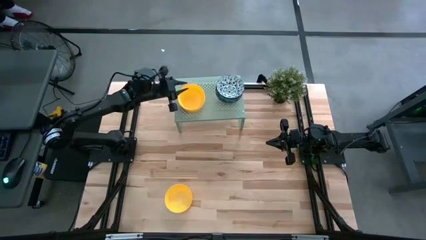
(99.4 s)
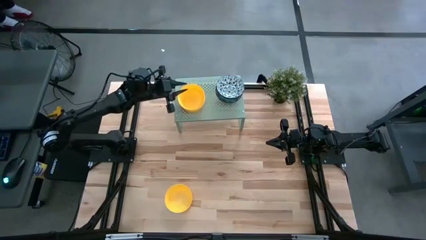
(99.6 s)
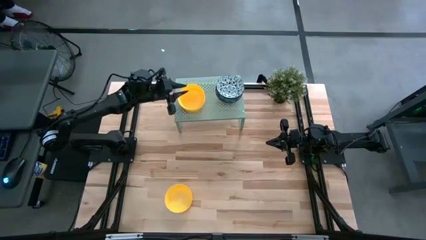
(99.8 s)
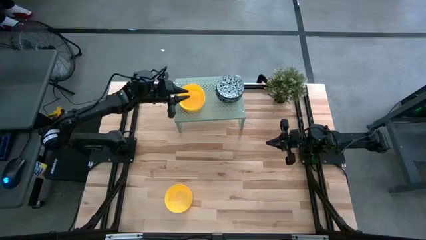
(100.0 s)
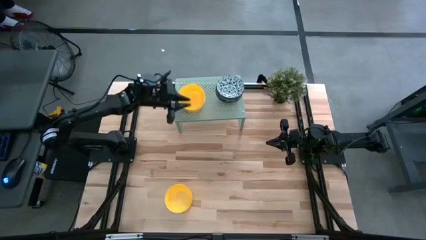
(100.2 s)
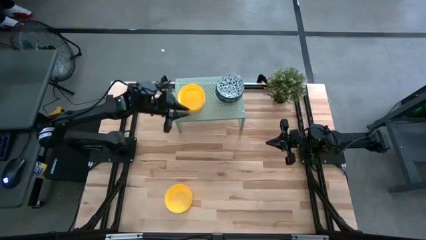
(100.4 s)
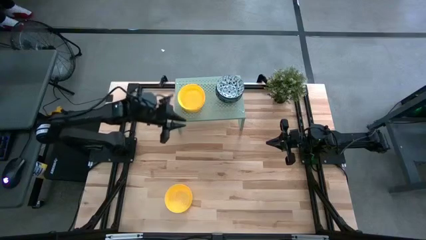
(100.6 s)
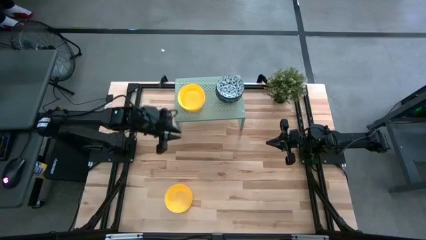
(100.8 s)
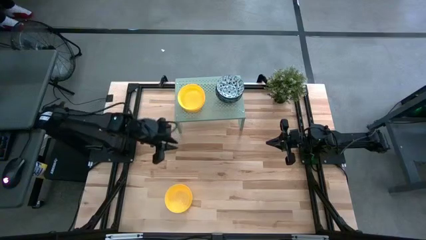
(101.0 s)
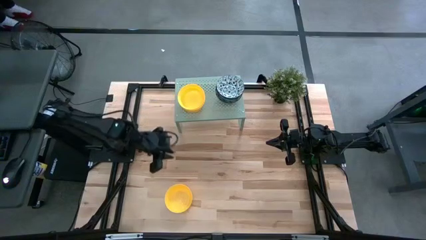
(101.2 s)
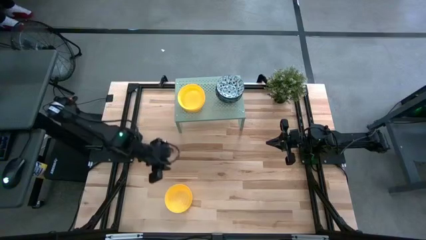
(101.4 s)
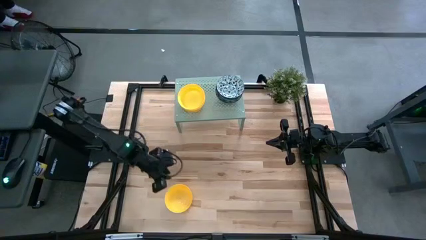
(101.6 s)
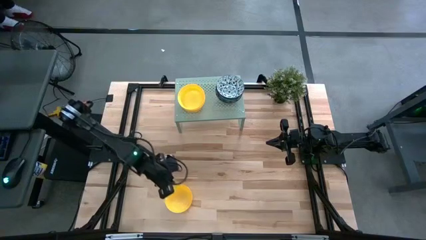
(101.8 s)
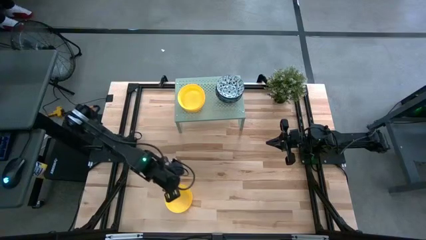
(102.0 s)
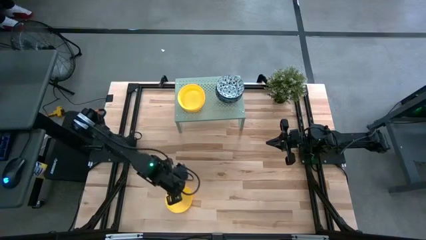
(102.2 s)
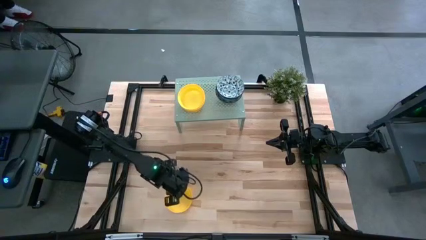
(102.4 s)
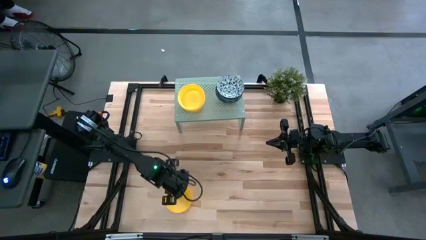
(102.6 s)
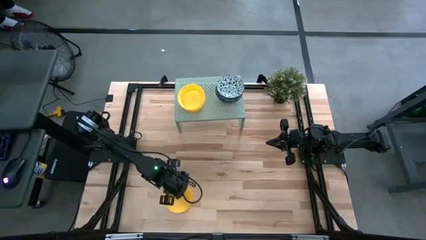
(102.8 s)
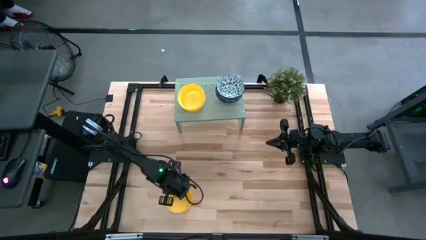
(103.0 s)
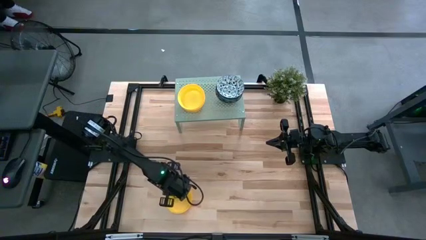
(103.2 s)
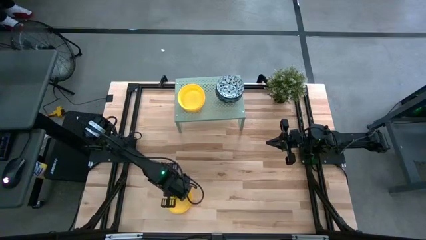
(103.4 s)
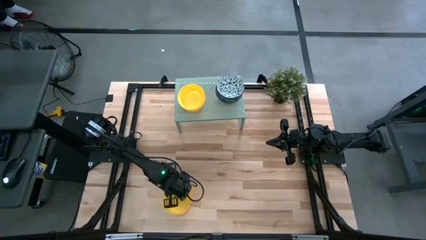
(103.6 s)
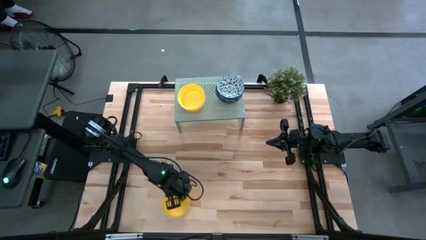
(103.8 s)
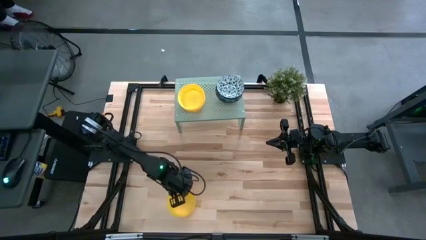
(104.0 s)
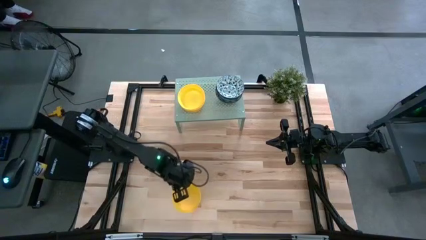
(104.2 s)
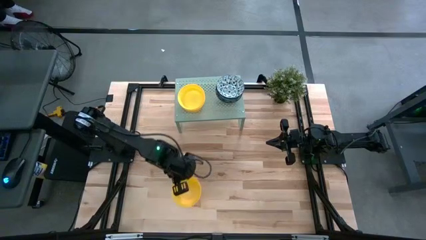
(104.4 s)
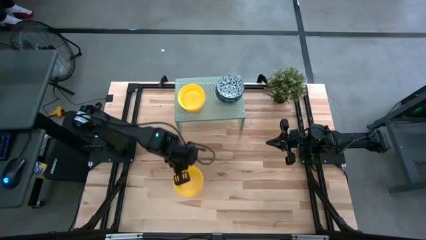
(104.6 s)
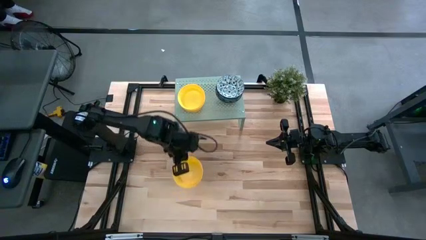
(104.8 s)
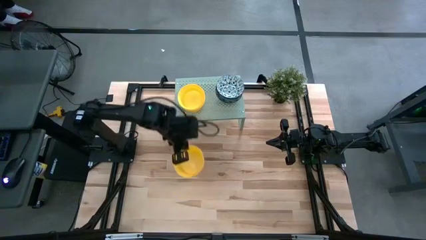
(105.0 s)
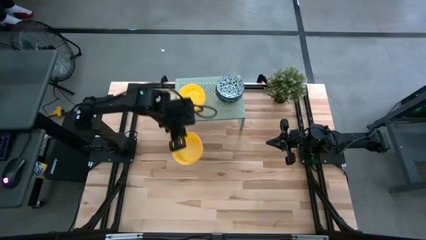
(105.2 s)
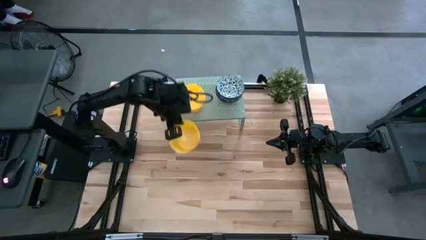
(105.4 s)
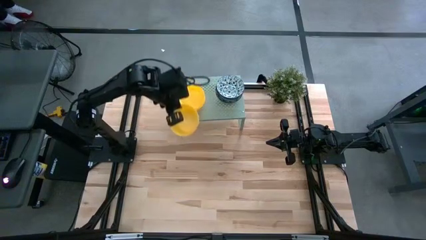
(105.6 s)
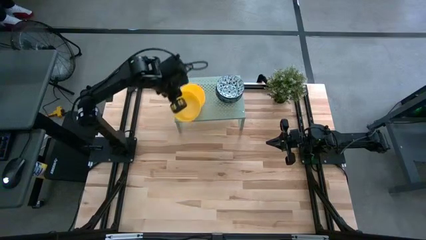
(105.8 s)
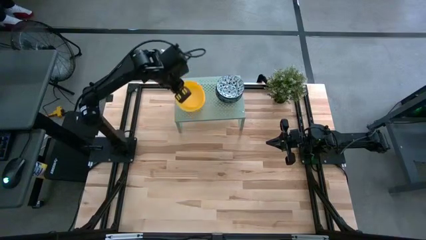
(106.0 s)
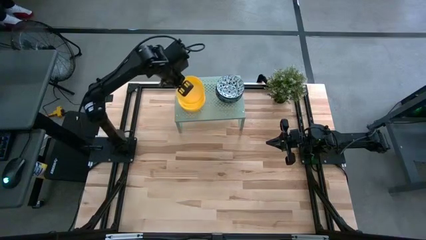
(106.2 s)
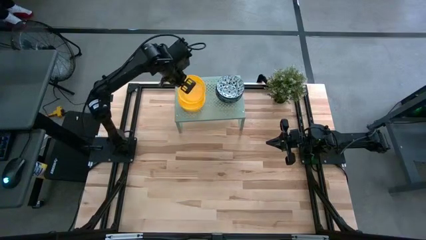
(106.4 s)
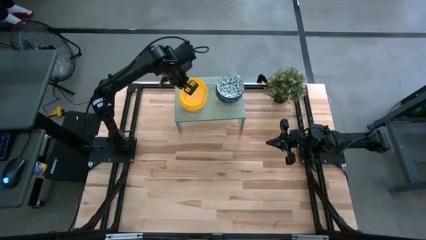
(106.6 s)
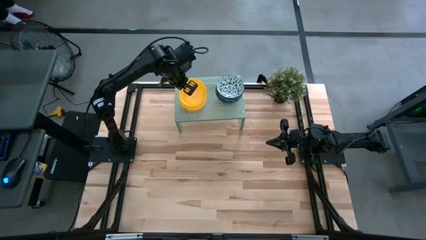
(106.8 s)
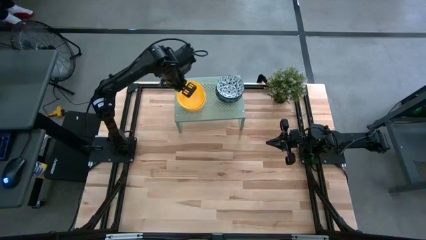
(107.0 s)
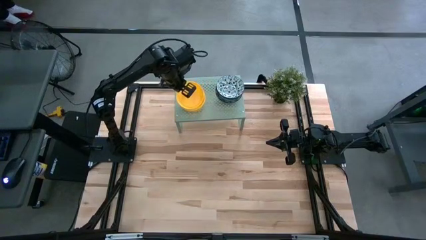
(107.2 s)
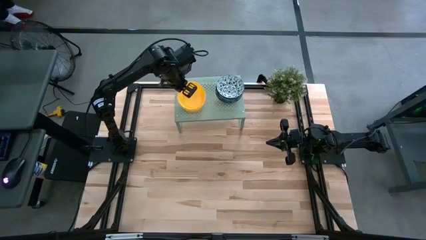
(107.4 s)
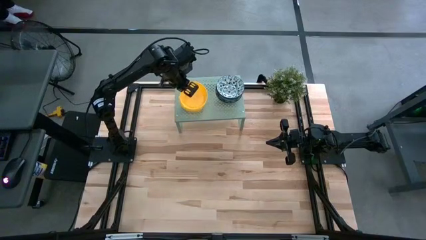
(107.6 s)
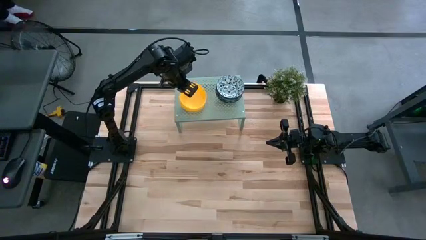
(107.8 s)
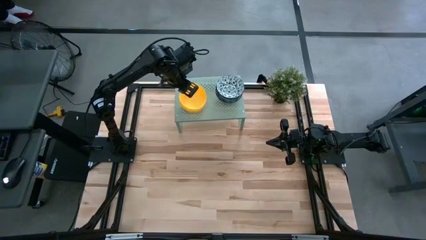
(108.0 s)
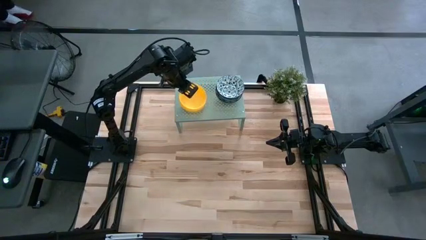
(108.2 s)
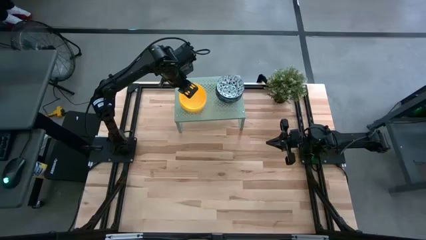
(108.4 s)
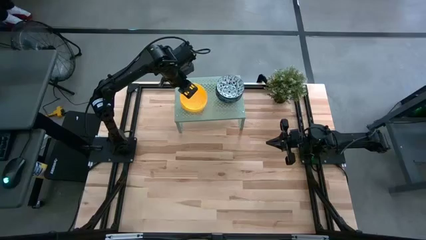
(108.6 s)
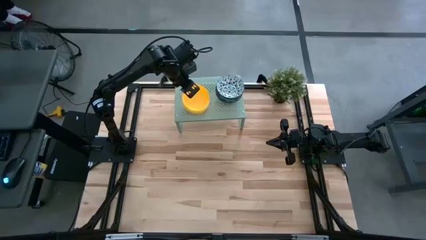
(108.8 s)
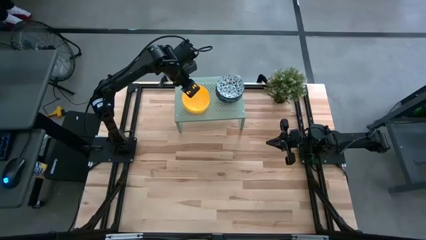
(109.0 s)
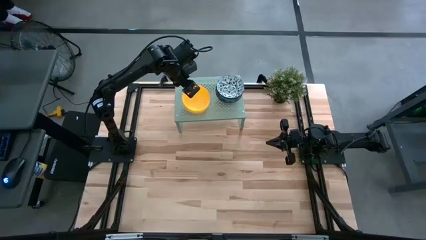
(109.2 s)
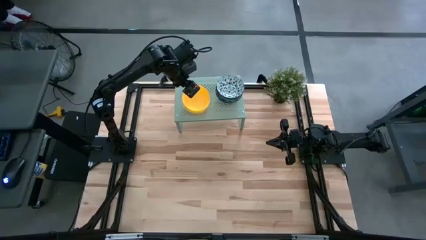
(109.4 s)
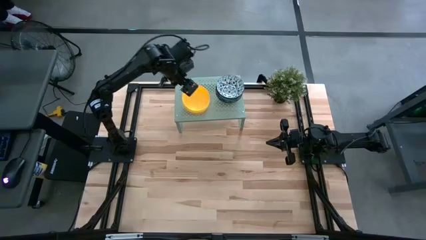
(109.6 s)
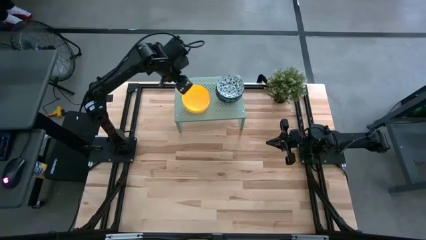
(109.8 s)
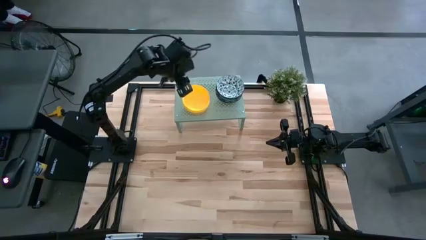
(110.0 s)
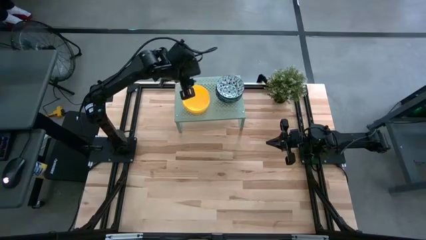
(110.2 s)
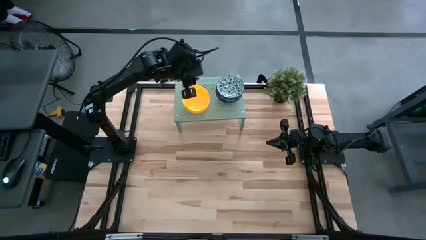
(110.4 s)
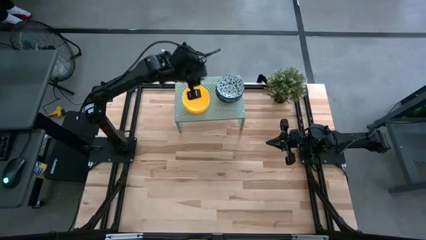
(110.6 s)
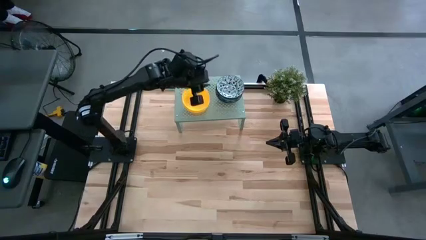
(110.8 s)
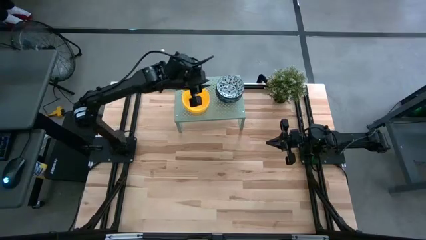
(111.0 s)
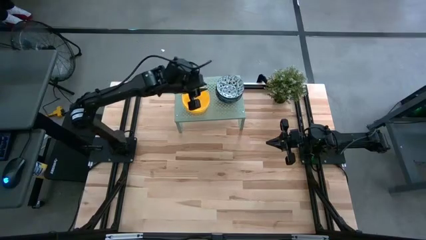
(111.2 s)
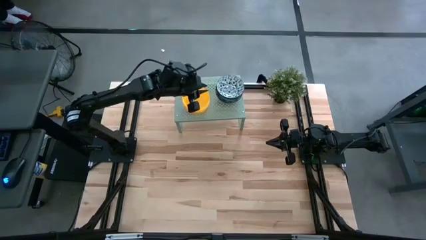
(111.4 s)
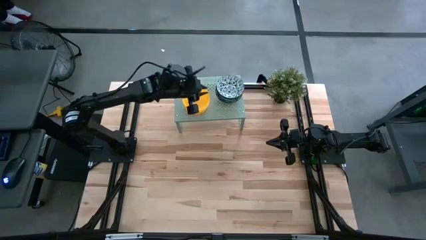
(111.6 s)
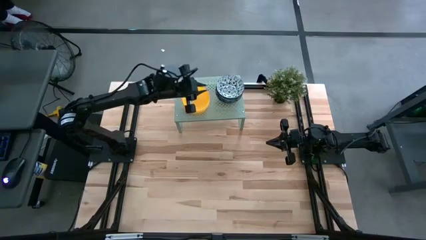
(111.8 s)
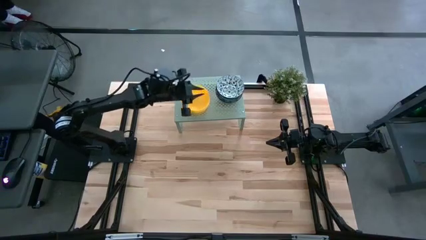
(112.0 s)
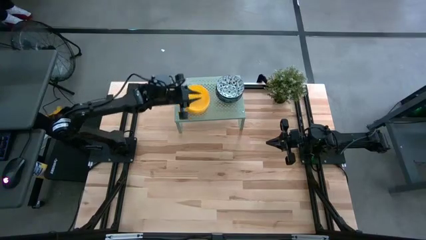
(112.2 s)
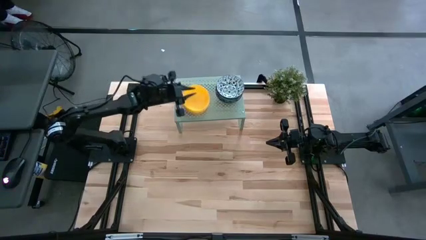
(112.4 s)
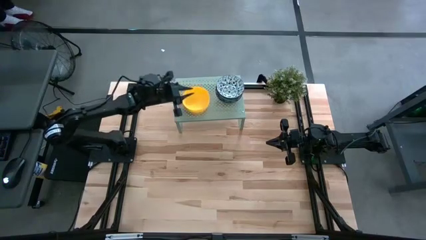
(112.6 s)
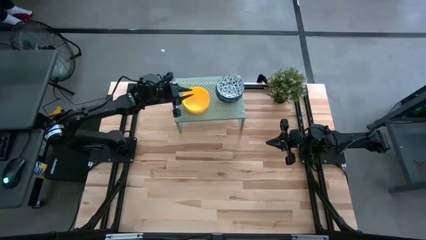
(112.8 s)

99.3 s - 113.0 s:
Task: Pick & Place Mini bowls
Stack the yellow bowl on top of the other yellow bowl on the shelf

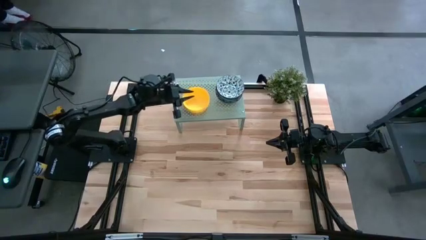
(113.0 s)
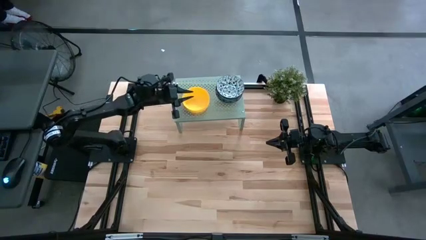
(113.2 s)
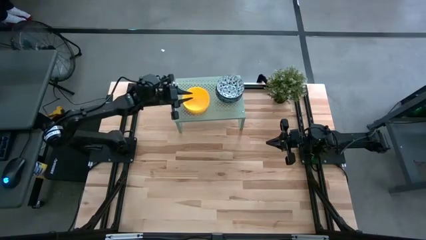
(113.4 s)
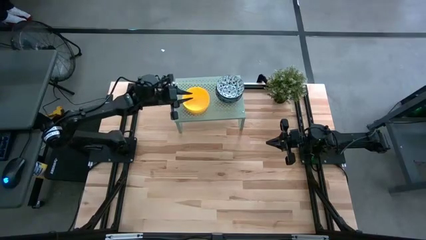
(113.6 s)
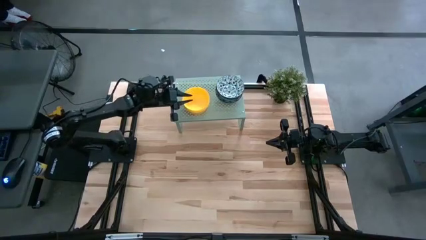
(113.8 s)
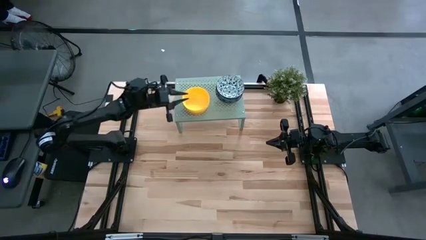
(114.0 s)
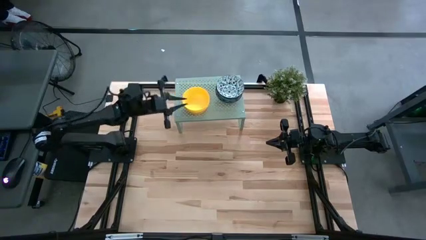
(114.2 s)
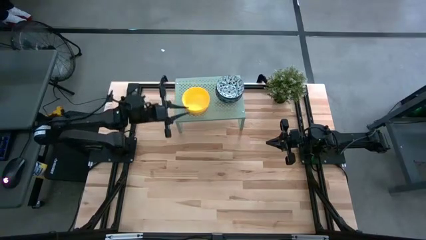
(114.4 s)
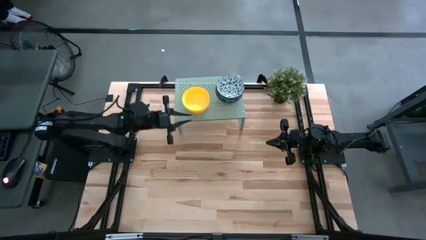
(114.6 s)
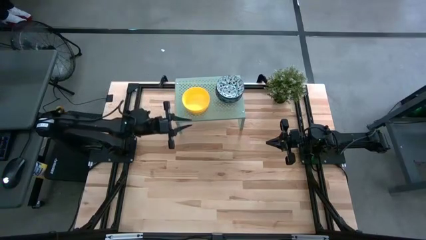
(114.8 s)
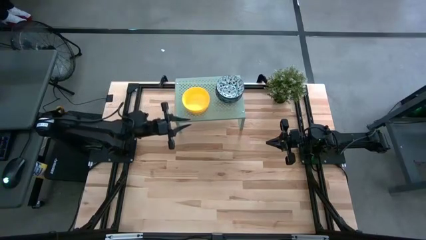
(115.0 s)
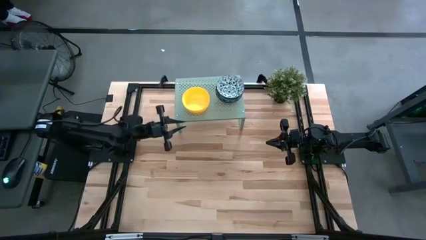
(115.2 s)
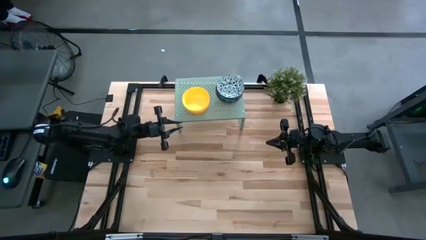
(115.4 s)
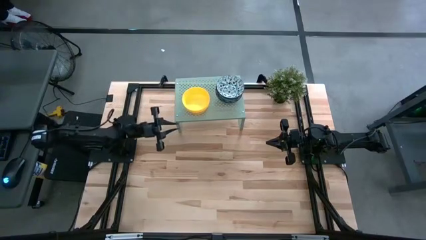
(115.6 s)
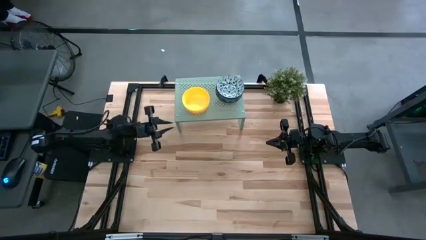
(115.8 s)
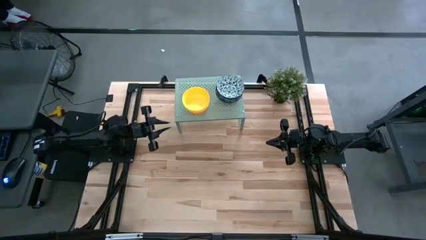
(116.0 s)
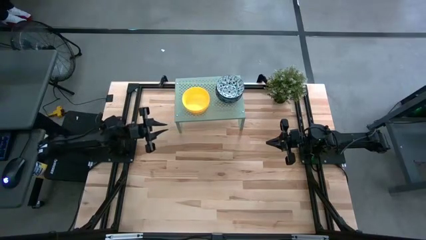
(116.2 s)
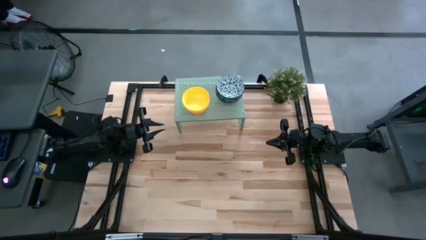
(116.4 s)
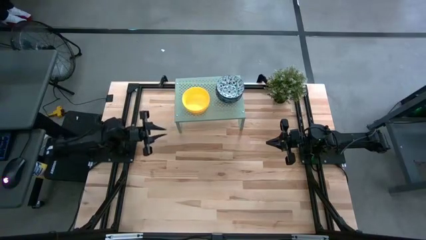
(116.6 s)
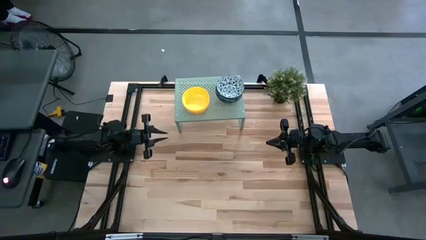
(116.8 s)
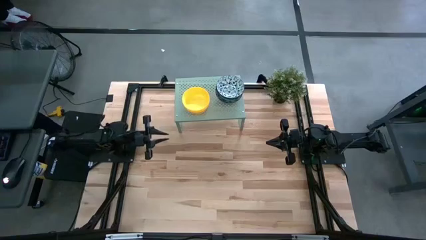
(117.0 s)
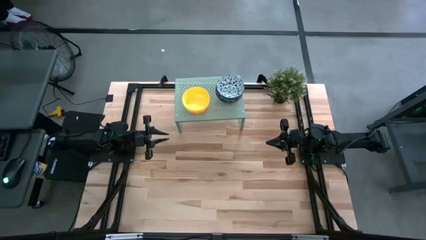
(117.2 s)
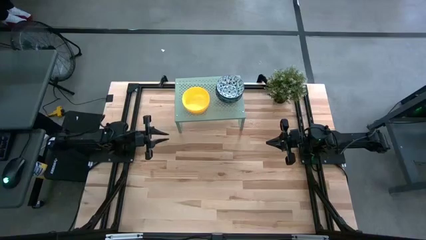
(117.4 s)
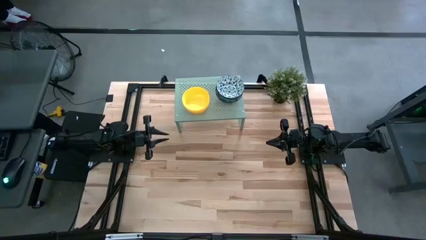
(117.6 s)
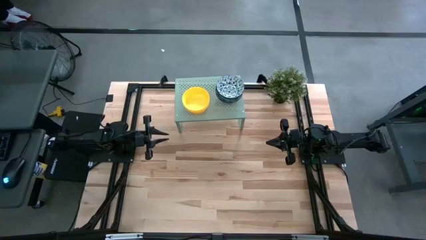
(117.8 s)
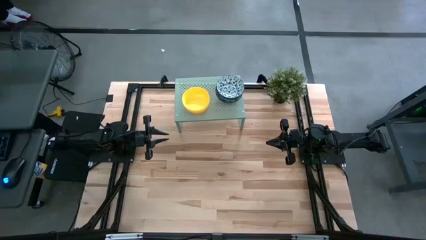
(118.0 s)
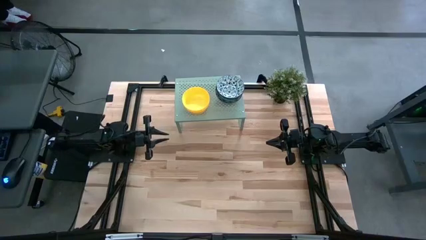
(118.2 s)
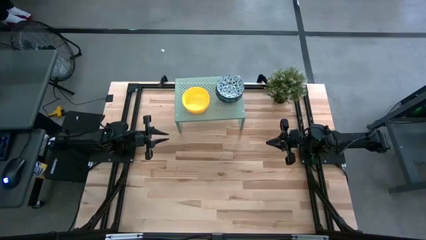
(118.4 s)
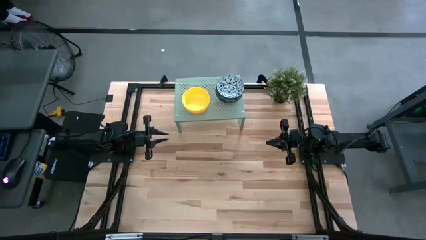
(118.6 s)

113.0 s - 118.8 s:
Return to Home Position
